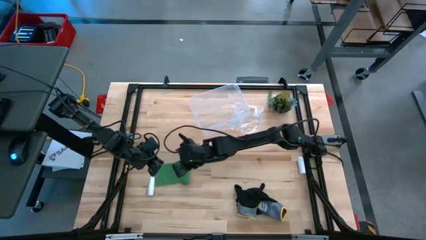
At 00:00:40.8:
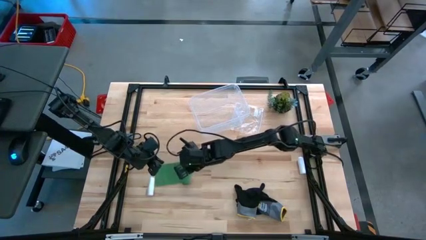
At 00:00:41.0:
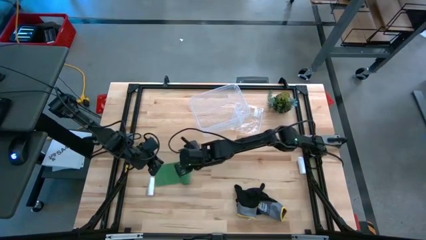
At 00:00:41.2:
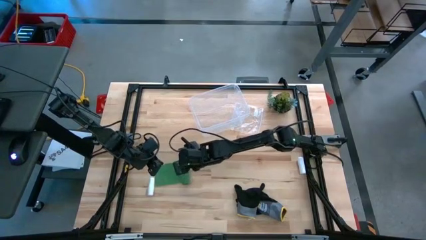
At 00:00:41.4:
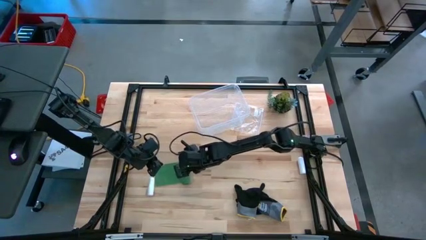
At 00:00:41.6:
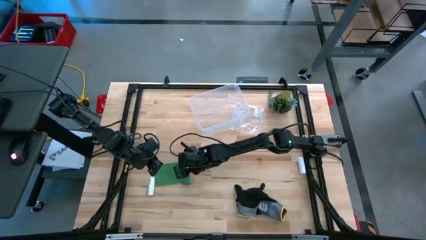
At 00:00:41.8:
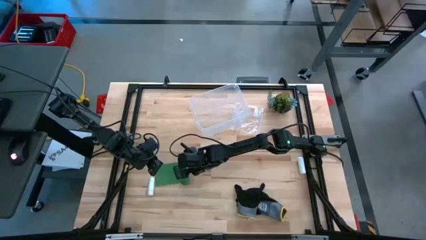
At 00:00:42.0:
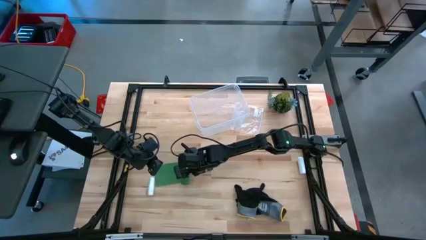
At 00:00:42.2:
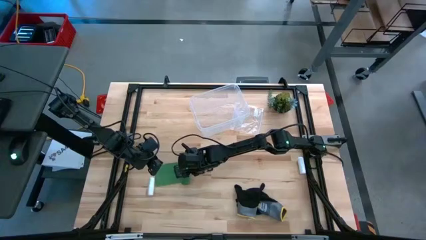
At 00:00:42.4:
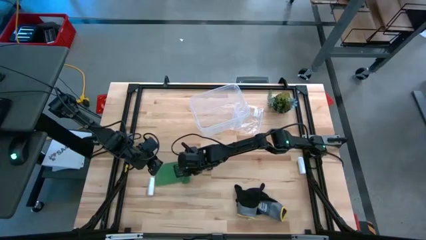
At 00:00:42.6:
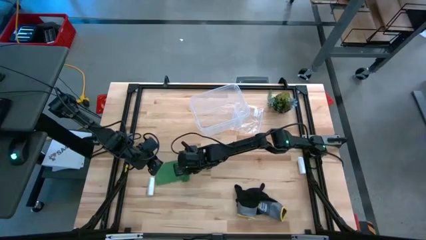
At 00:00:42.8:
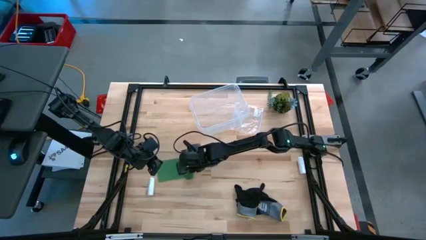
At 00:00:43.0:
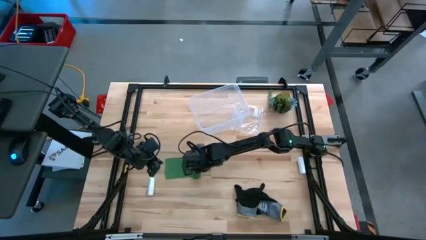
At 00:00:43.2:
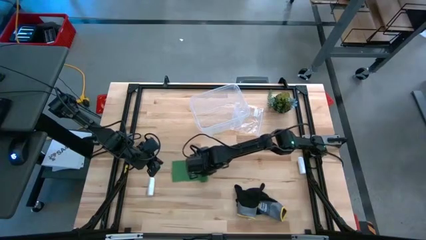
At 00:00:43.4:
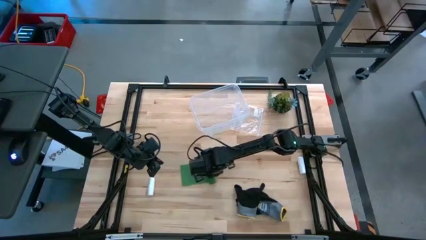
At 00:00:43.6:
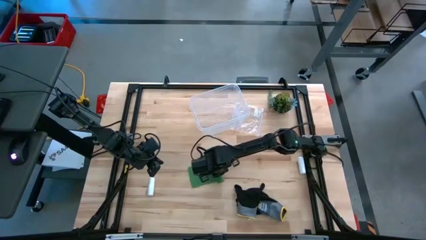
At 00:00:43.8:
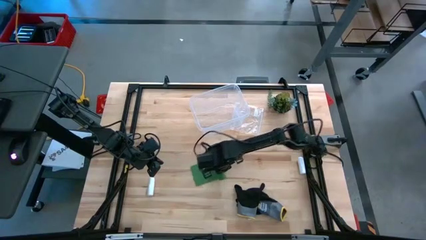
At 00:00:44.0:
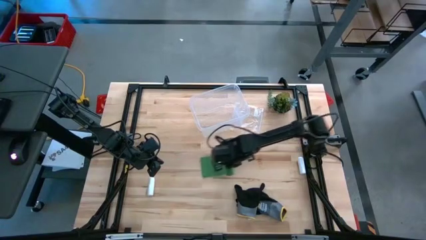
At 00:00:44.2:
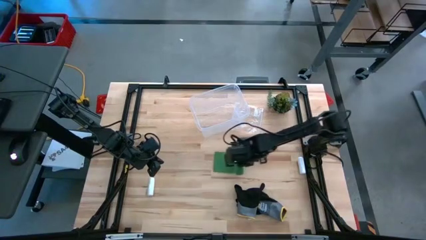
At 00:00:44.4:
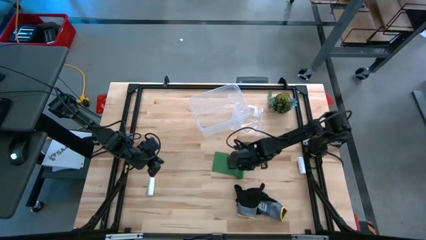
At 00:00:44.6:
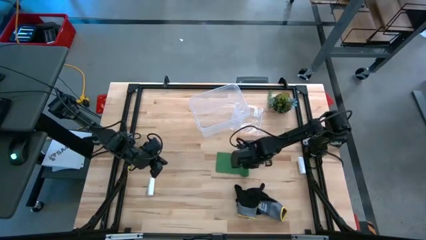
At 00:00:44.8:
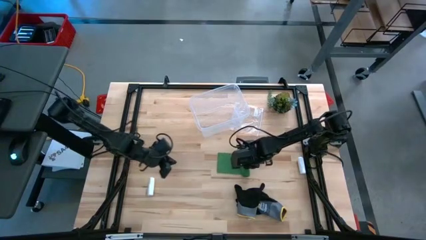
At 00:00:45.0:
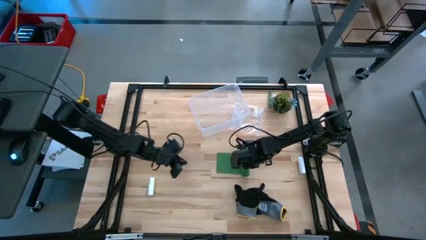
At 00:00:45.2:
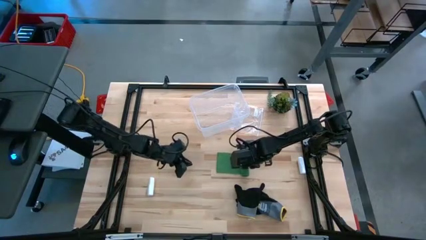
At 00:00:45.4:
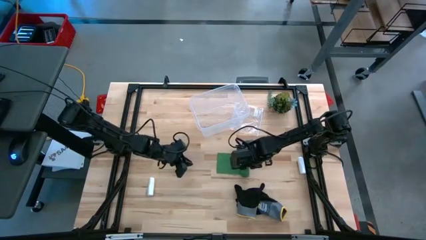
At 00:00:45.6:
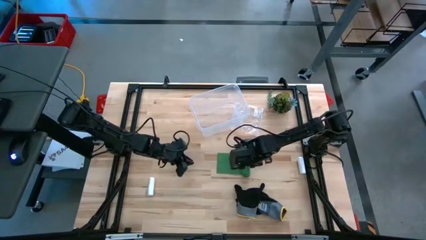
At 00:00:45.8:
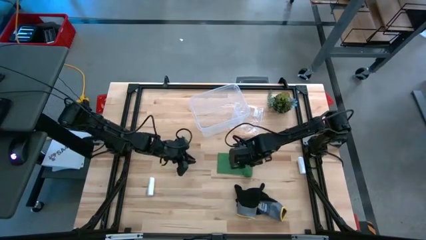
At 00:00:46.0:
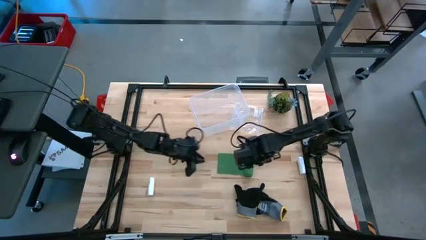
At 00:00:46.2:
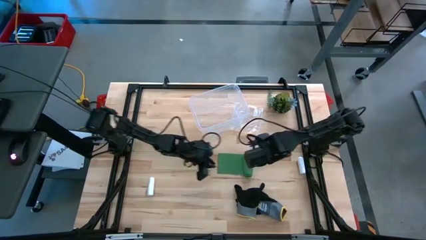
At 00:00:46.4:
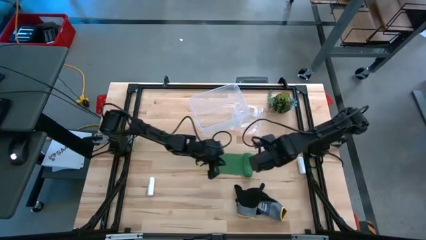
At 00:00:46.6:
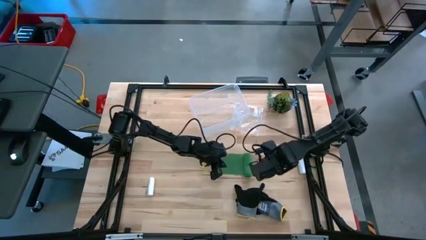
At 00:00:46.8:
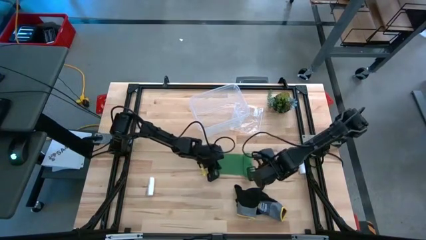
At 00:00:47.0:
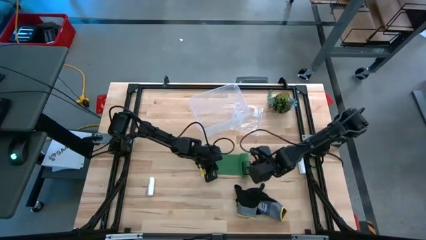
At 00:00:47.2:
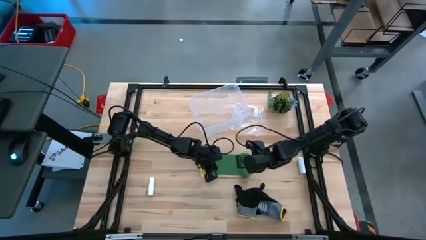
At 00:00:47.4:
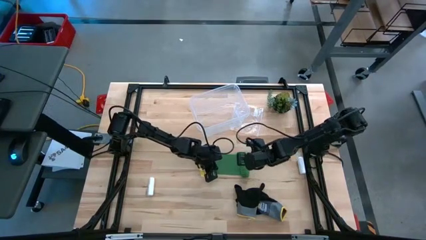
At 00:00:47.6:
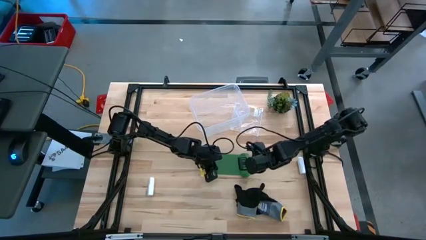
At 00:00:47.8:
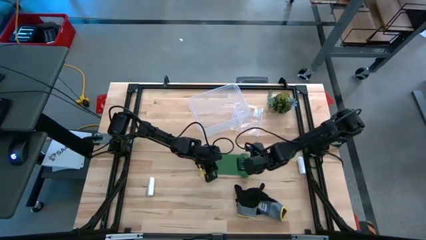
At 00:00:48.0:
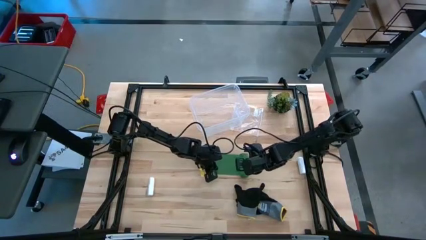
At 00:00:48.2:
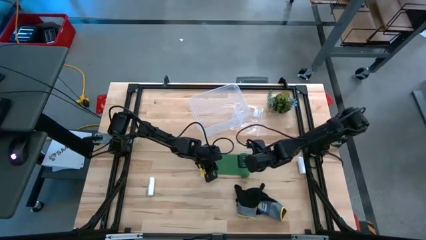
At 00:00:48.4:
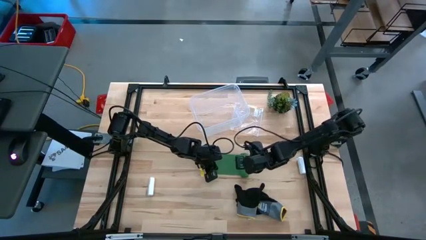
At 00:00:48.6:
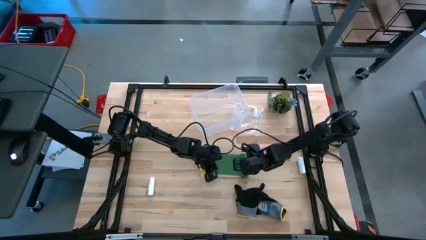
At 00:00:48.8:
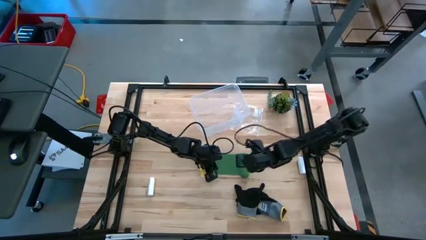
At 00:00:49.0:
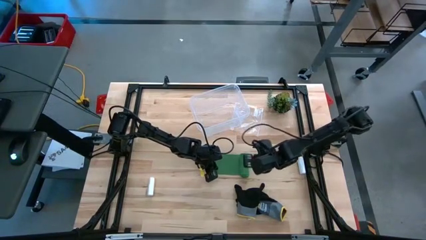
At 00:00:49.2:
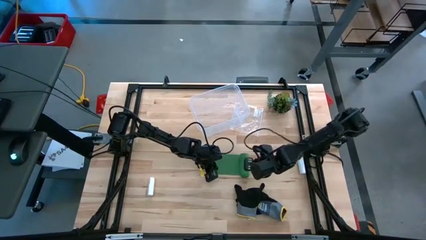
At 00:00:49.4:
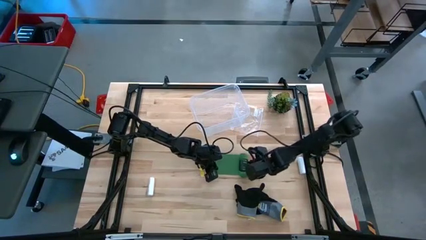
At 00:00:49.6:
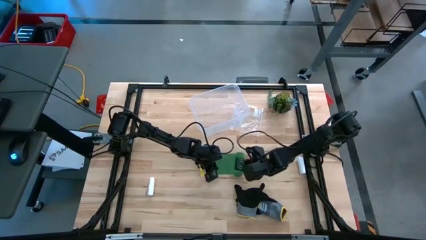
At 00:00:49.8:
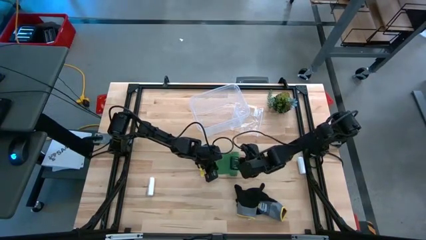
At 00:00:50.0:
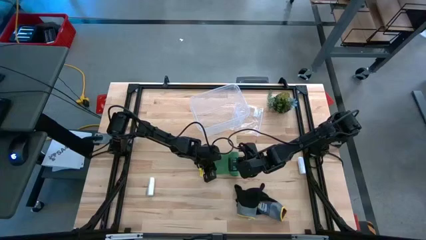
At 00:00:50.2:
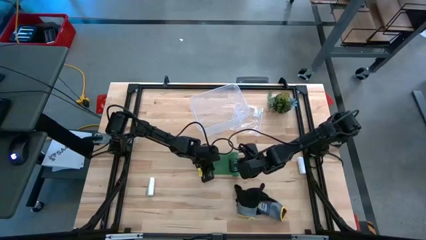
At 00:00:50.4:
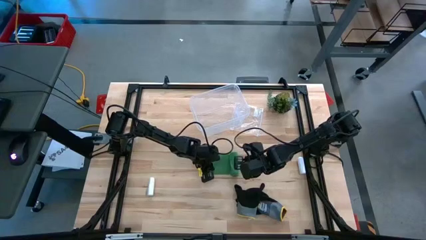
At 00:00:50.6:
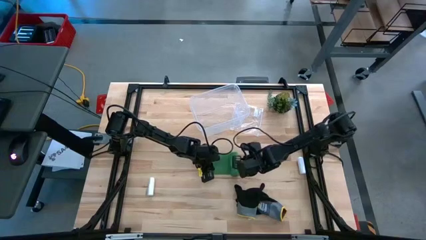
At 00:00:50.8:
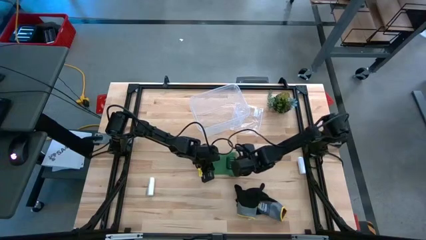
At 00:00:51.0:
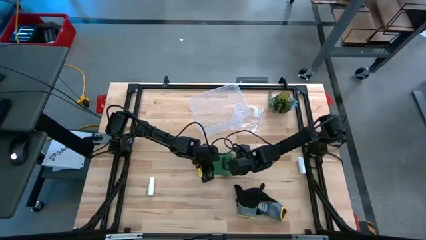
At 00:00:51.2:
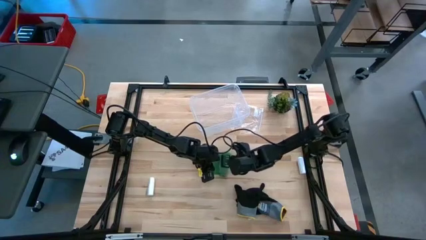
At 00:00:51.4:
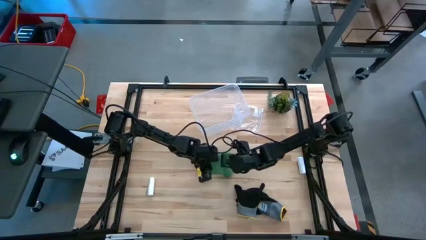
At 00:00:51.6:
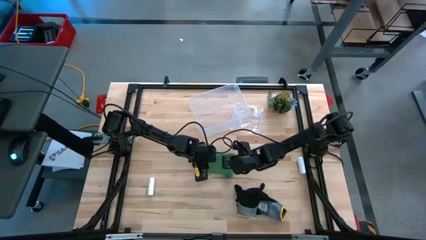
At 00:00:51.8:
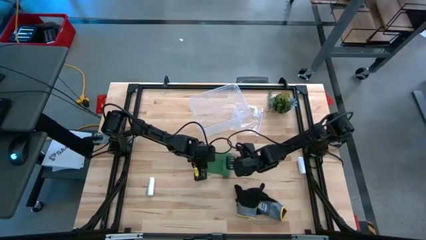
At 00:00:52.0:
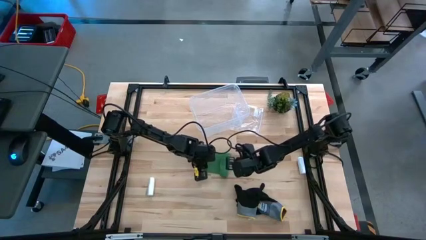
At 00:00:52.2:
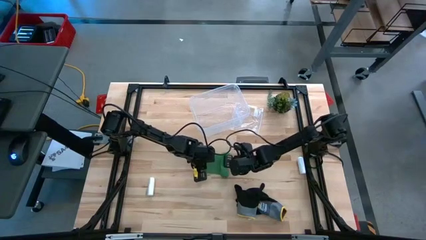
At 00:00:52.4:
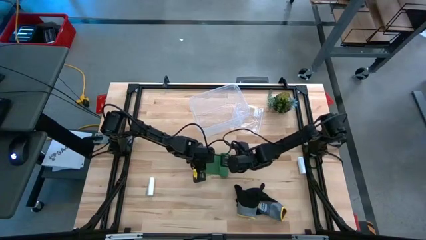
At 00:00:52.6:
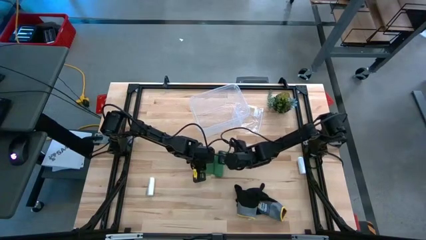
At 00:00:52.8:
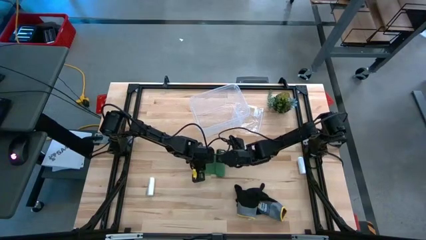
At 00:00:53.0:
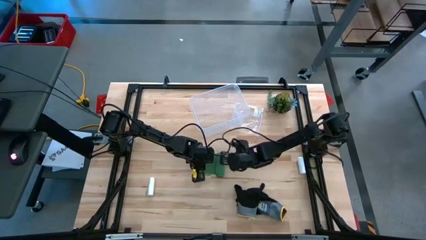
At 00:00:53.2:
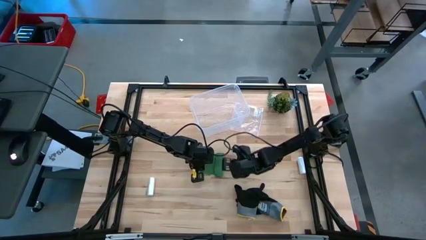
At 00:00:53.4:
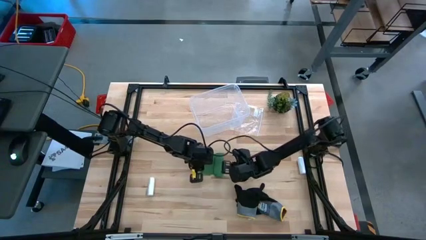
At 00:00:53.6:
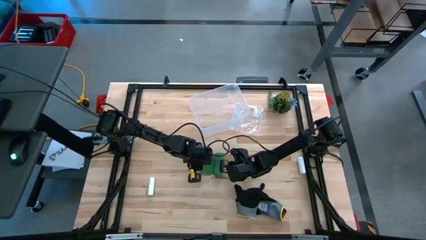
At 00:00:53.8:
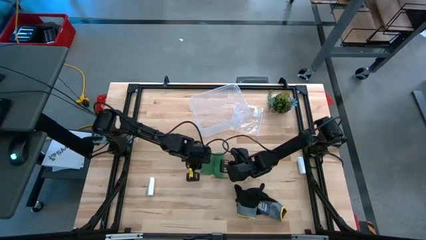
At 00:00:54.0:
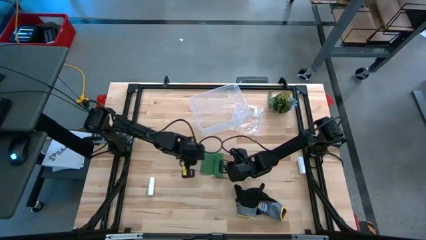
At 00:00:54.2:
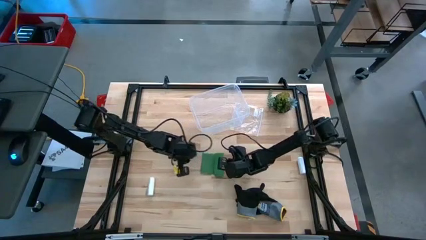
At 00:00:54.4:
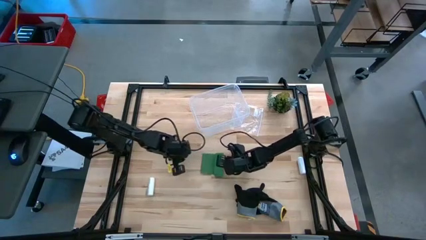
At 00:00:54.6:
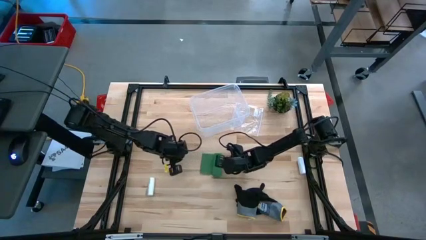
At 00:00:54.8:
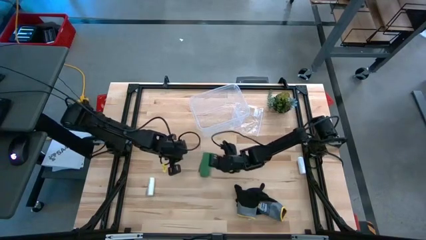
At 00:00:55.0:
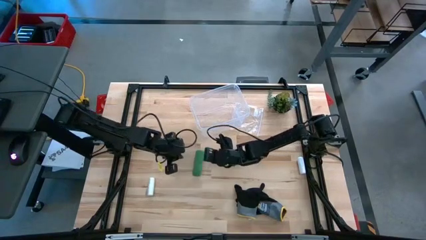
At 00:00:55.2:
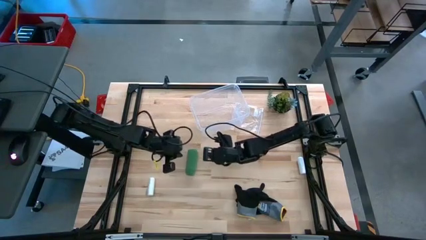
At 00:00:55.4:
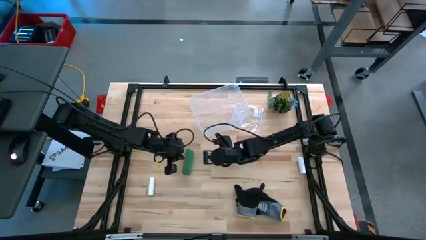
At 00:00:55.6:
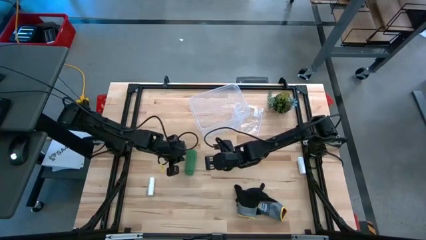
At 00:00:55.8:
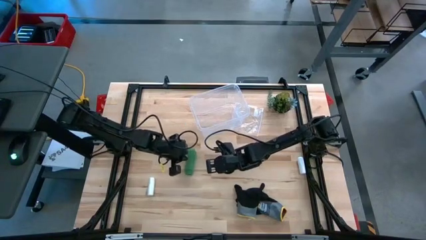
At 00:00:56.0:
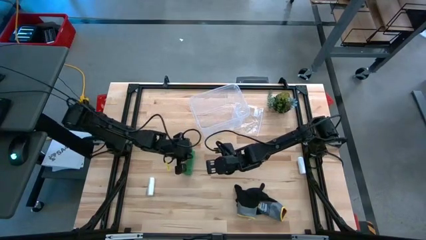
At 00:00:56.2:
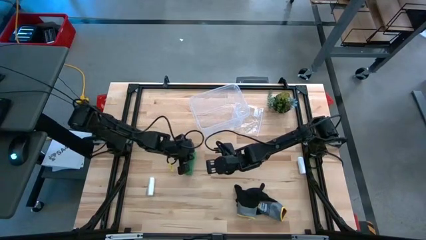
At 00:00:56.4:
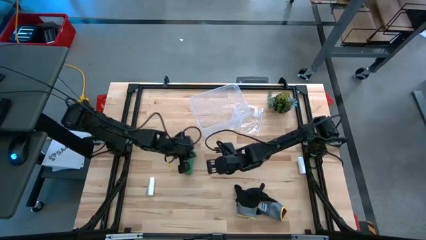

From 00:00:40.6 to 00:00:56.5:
Task: Roll bandage
Roll the green bandage
